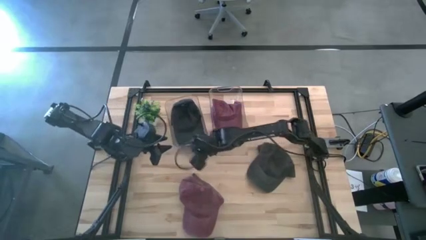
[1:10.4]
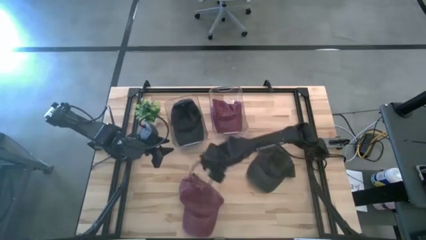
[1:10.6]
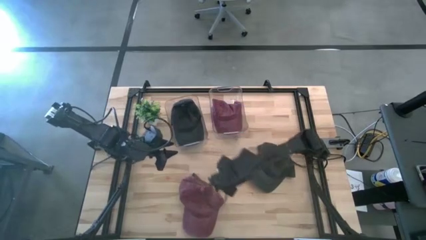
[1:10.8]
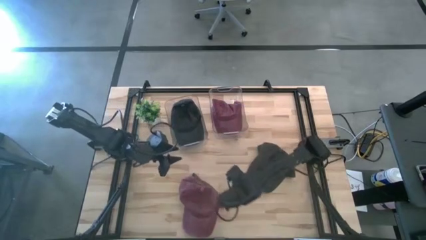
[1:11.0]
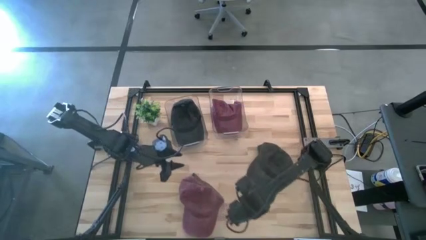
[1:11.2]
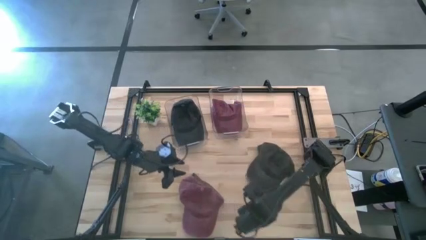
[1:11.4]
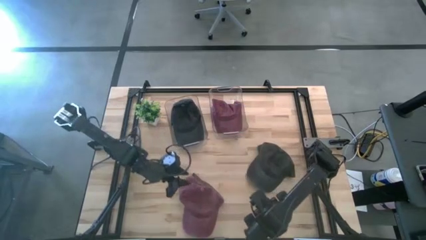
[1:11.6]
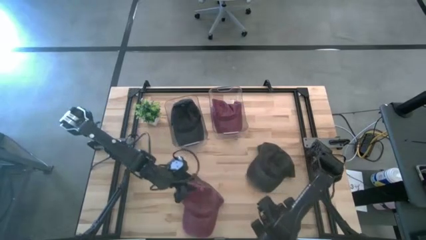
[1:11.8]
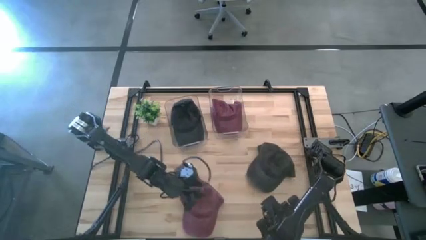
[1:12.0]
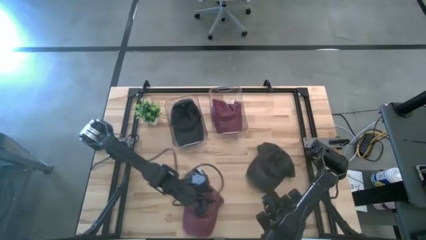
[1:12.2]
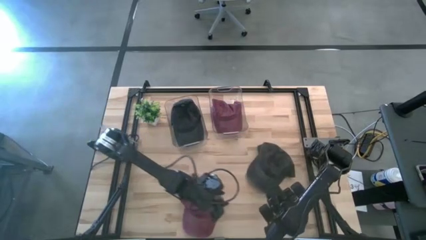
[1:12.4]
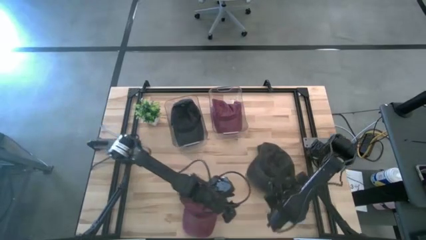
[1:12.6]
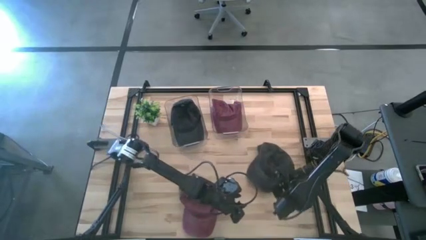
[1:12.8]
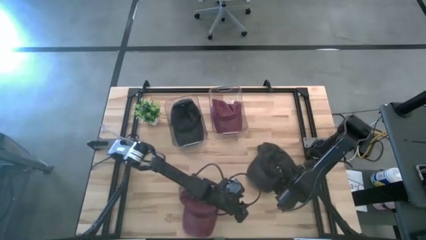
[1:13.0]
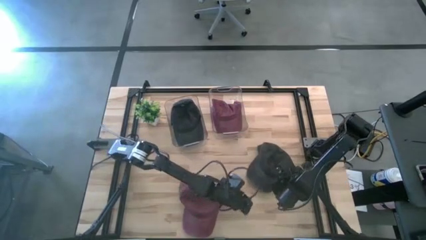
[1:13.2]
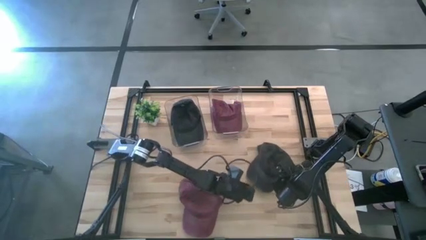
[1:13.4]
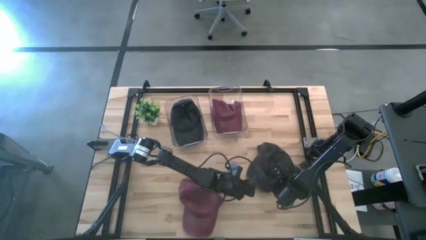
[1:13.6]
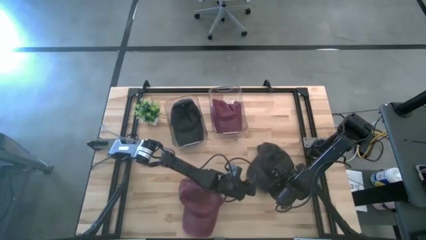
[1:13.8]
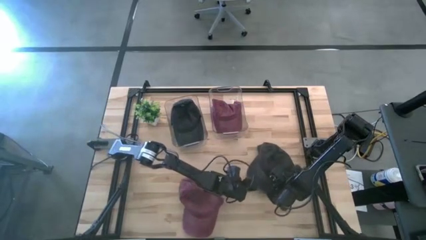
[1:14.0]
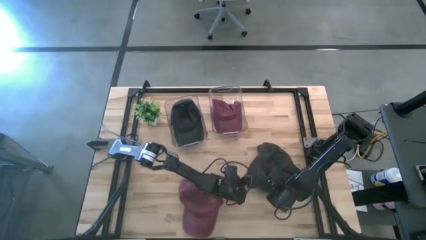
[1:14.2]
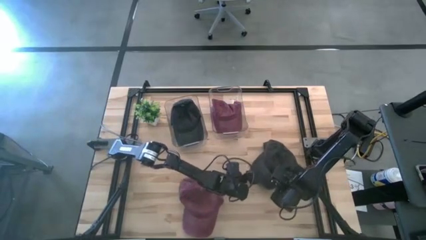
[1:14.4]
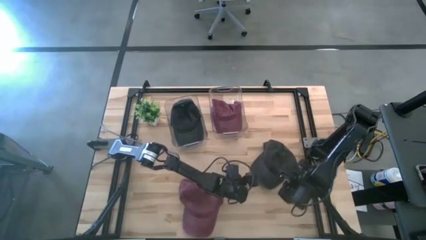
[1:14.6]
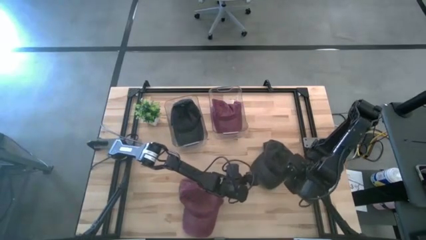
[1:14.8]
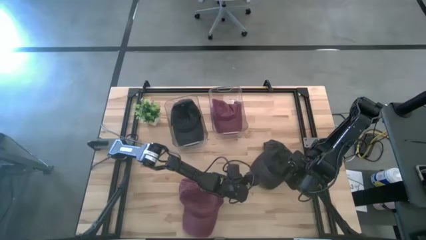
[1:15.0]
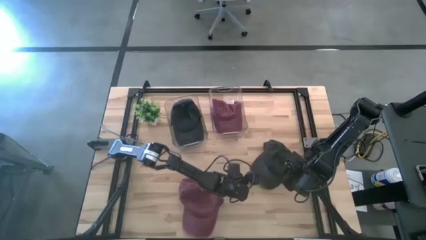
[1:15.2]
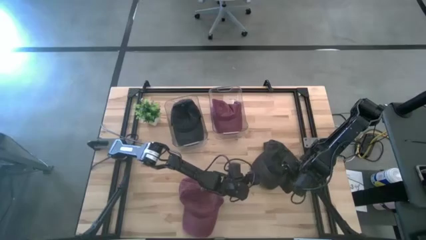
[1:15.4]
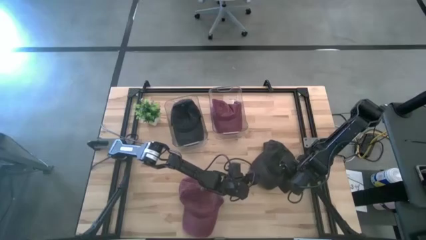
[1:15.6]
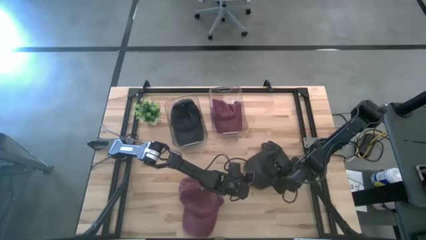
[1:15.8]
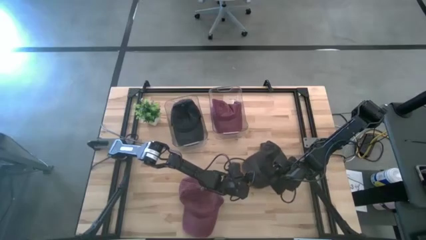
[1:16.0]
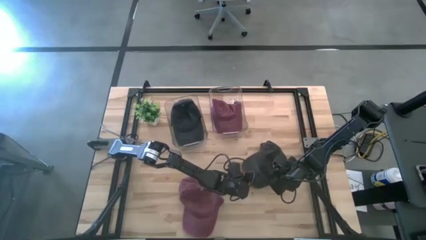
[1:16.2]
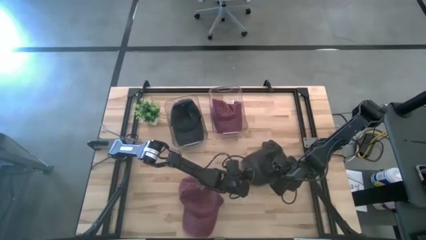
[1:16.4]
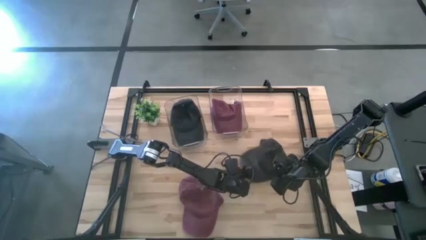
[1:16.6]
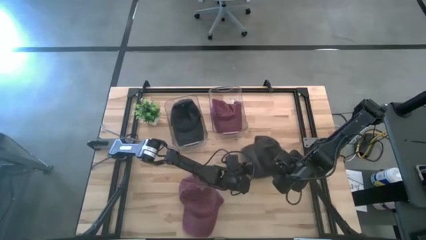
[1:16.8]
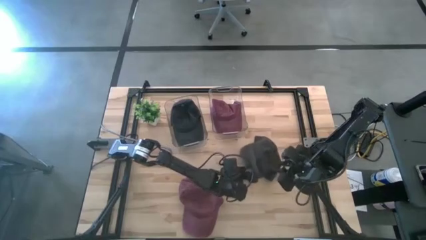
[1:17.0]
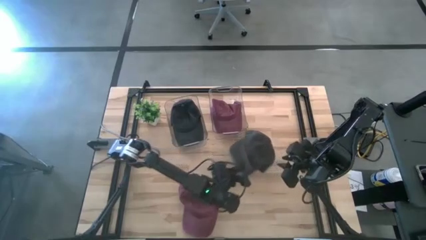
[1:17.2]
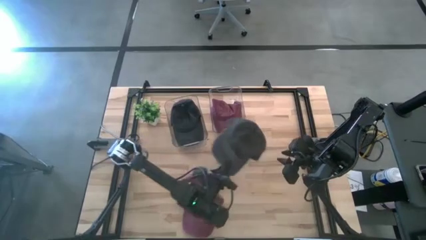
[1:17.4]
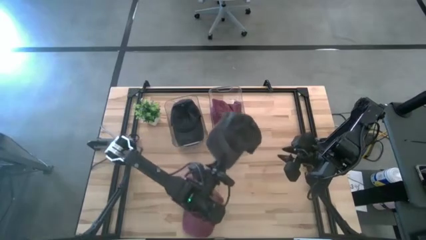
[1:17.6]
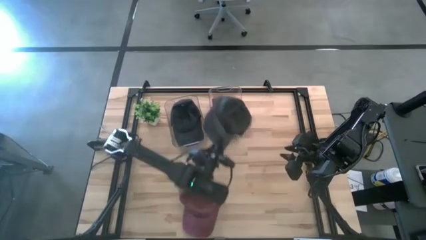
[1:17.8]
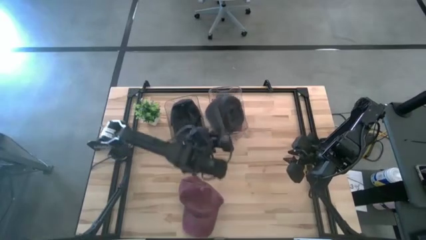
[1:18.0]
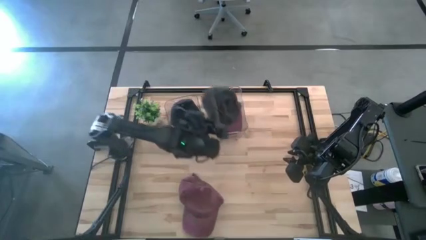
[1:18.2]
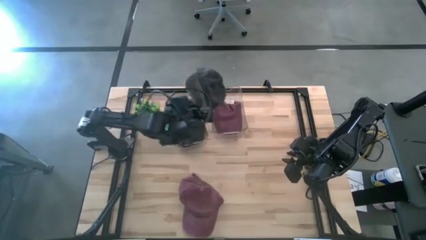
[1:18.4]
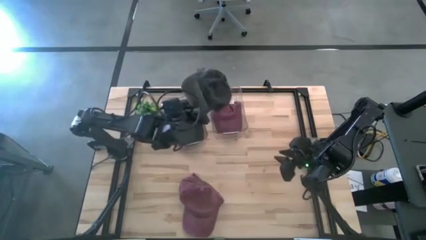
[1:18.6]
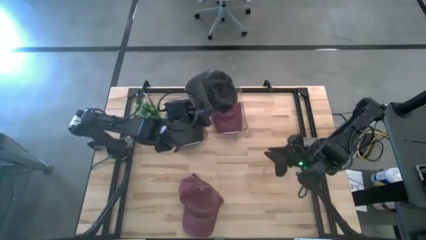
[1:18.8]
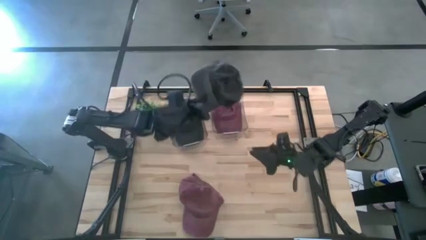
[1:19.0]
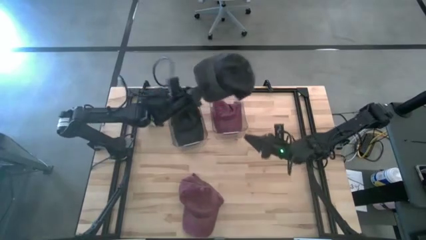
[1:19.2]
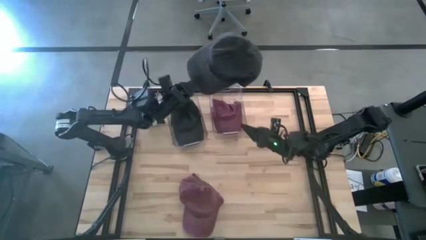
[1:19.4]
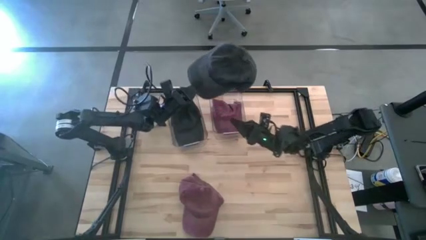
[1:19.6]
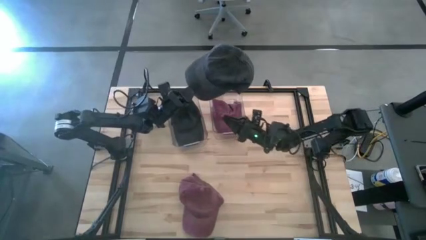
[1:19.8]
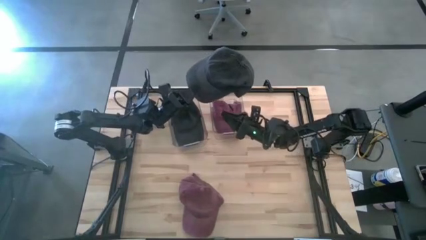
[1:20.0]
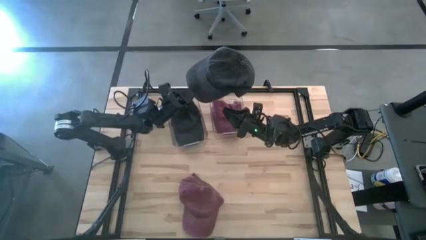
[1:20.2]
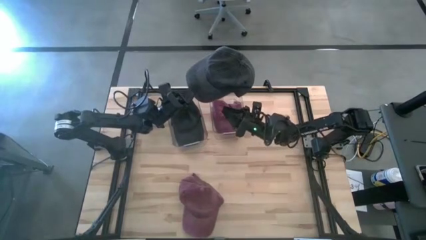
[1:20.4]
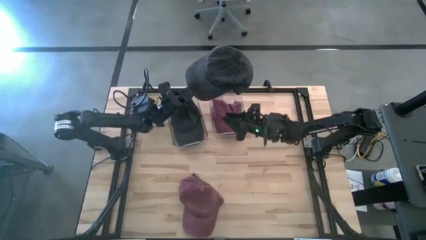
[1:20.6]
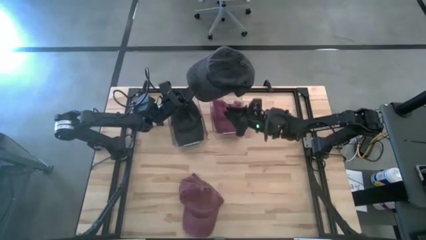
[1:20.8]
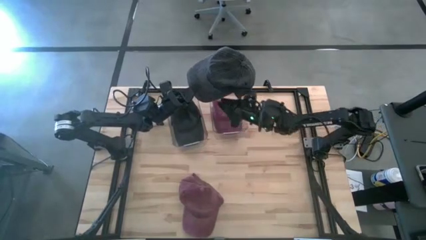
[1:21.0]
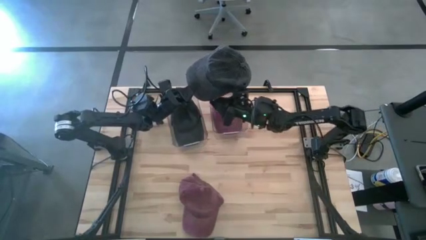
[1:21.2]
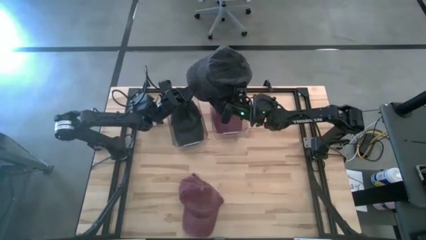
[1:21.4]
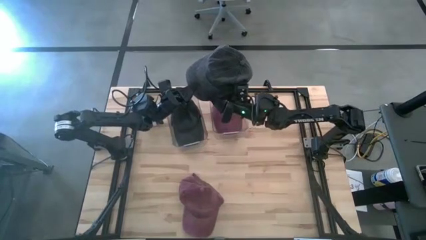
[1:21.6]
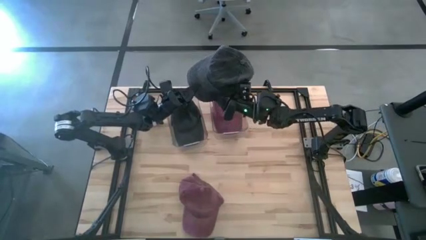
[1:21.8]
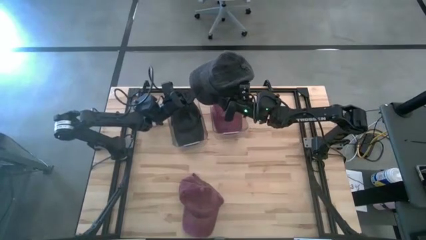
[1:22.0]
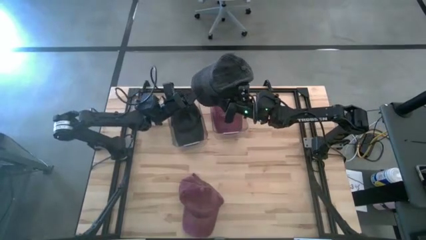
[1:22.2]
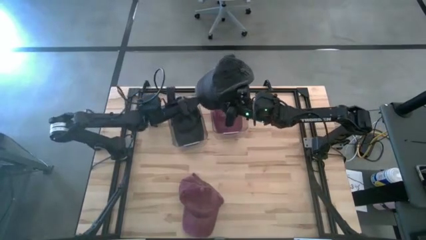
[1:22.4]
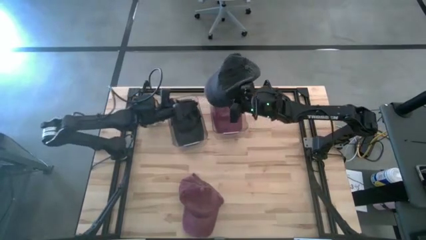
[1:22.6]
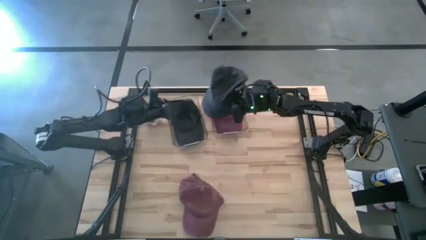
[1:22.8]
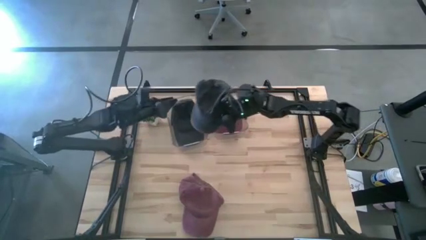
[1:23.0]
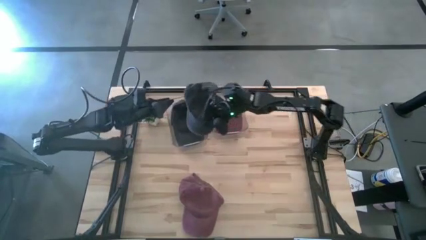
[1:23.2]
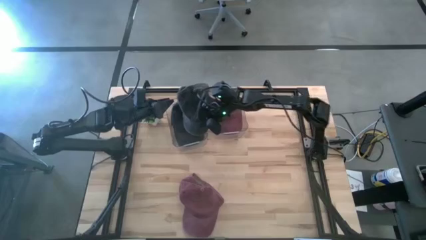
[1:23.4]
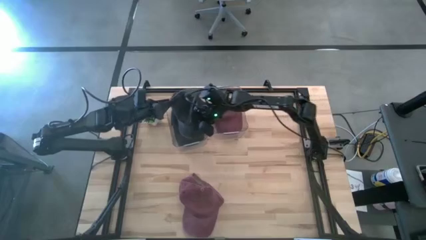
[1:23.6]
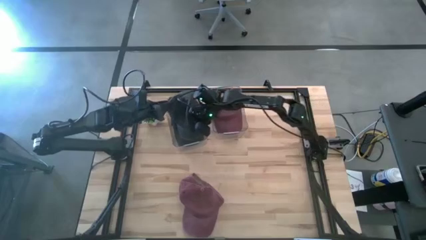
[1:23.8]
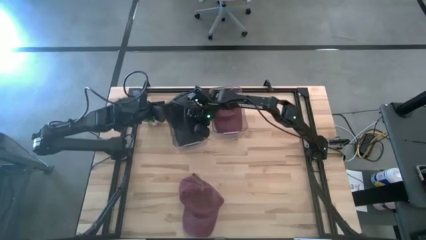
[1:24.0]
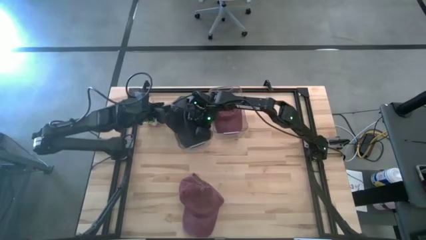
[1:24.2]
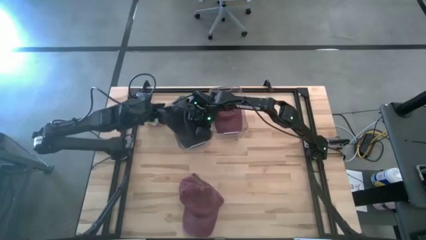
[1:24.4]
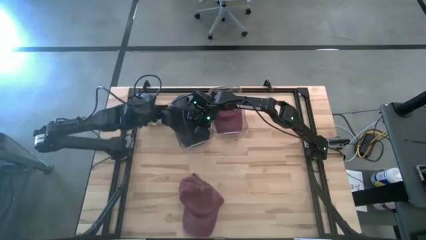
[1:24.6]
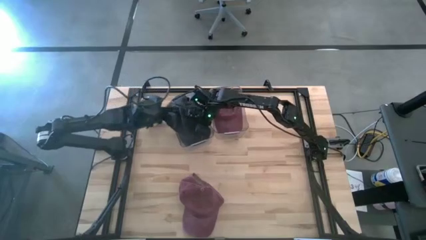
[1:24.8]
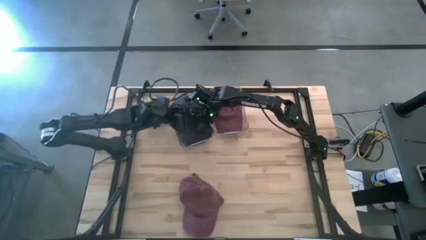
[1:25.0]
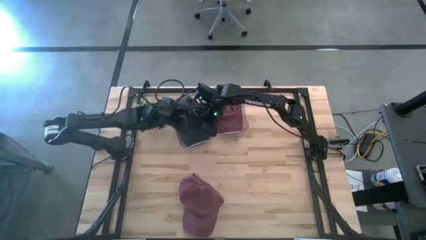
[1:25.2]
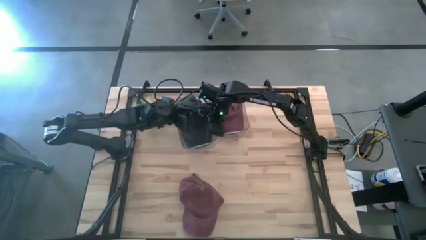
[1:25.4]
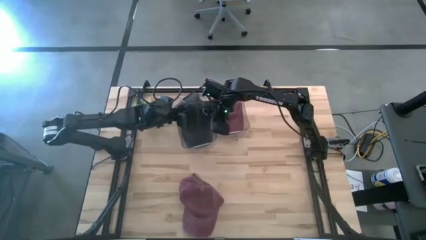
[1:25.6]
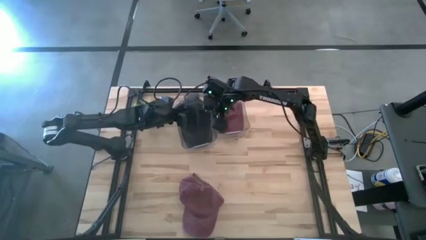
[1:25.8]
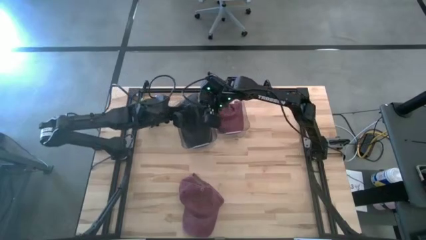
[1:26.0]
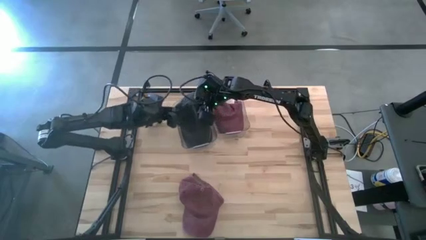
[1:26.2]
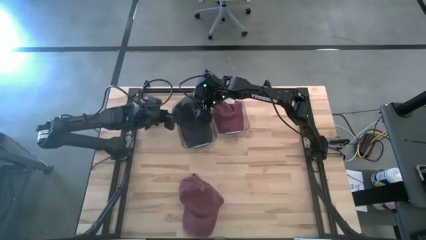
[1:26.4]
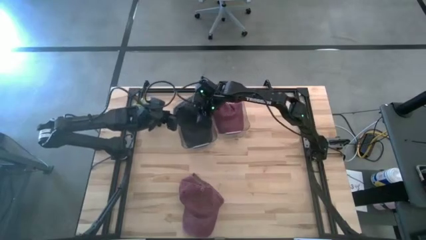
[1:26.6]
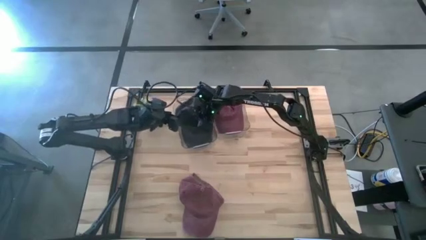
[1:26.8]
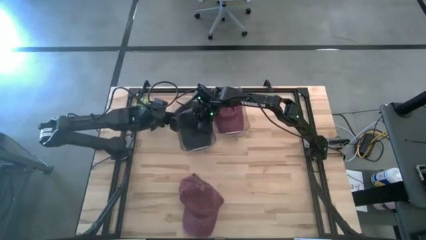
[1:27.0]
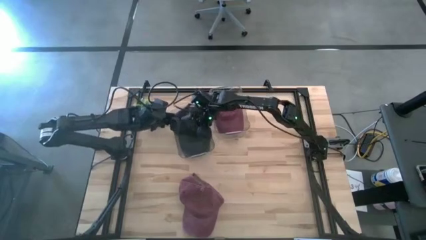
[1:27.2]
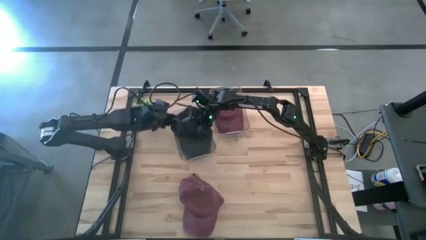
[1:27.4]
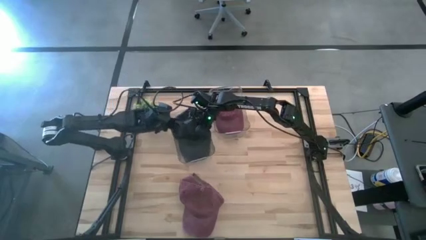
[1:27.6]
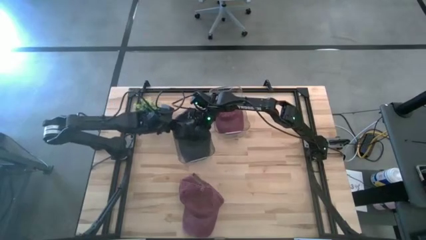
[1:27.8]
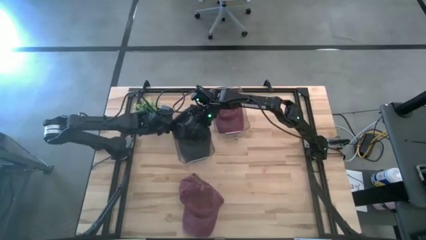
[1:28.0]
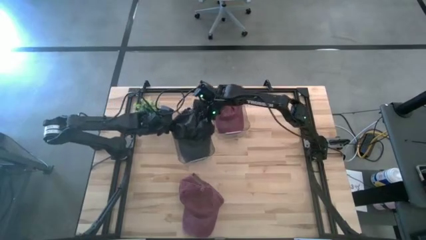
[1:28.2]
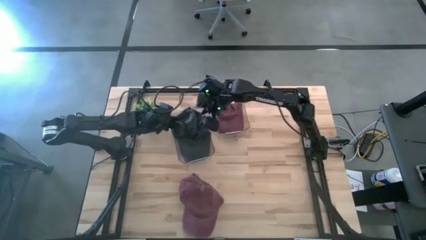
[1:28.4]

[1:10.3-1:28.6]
Task: Pick & Place hat
Put the black cap into the left transparent bin
